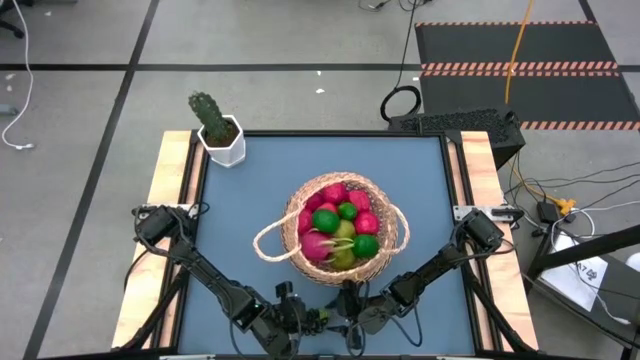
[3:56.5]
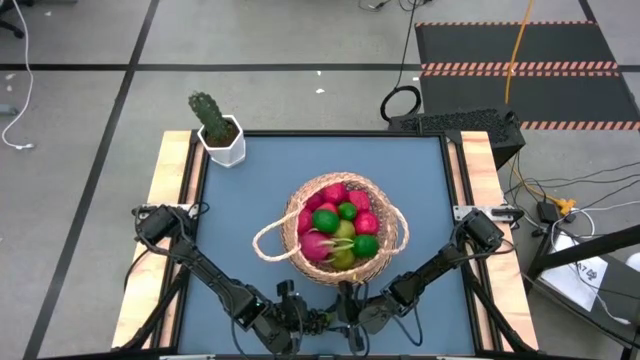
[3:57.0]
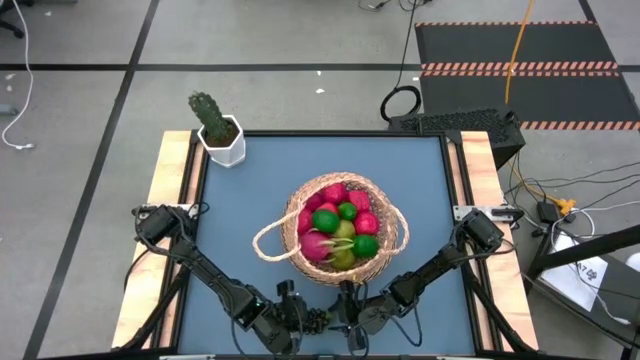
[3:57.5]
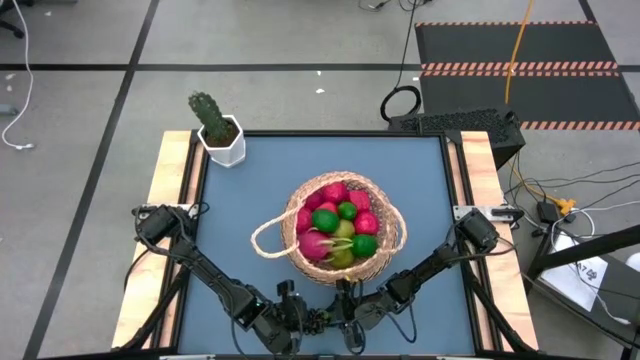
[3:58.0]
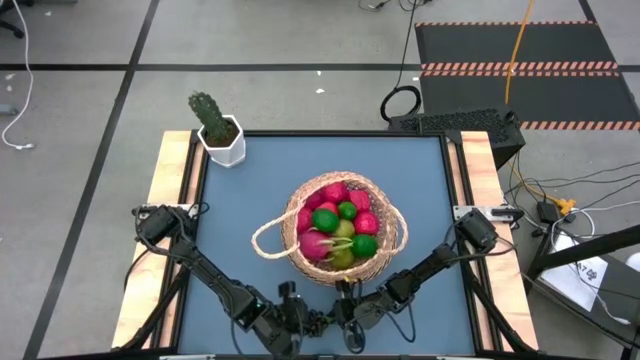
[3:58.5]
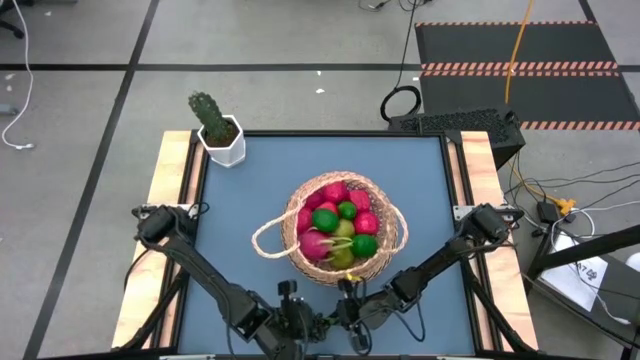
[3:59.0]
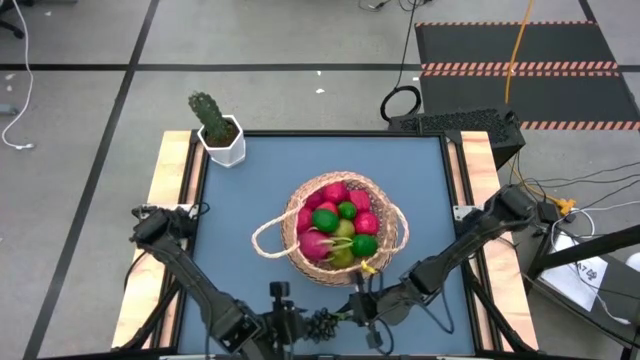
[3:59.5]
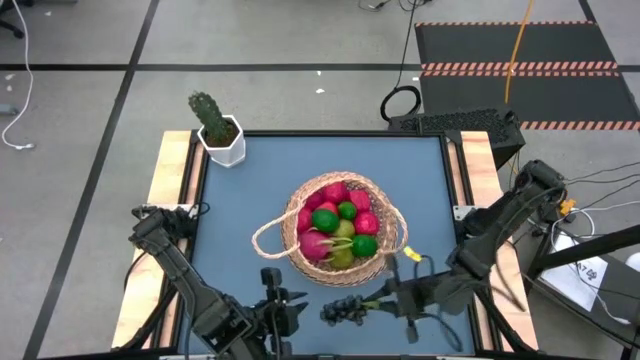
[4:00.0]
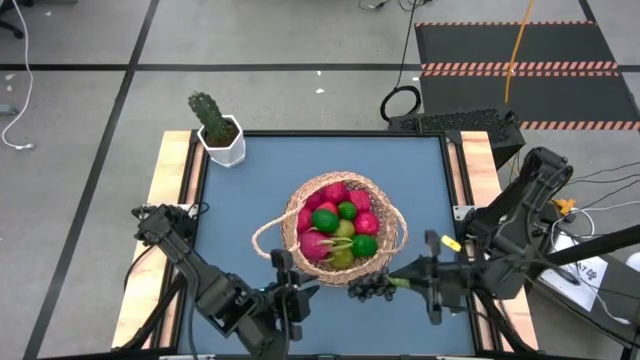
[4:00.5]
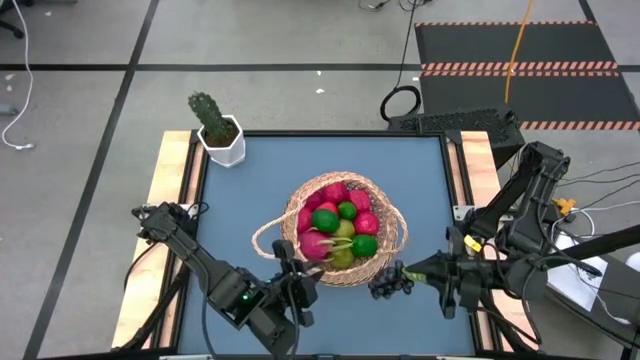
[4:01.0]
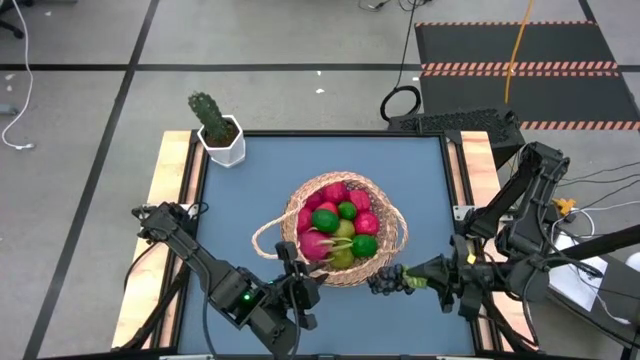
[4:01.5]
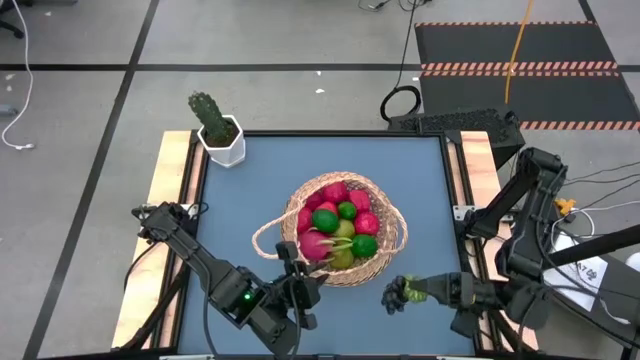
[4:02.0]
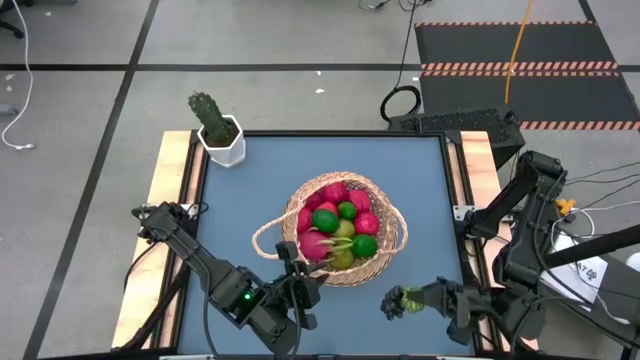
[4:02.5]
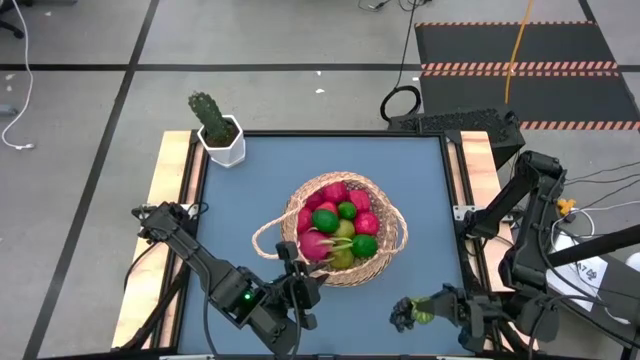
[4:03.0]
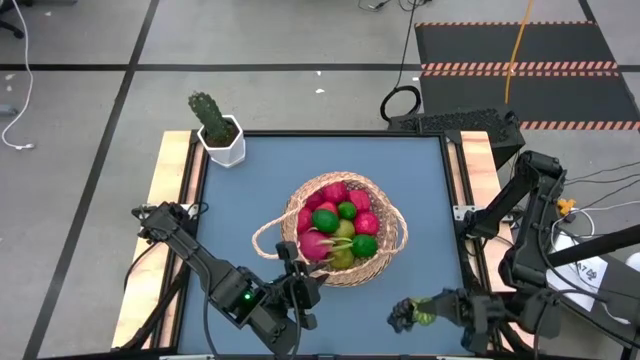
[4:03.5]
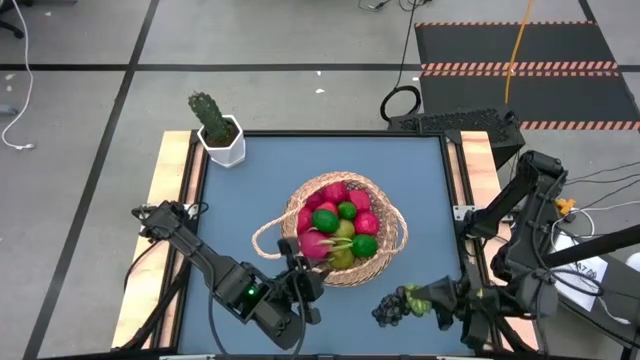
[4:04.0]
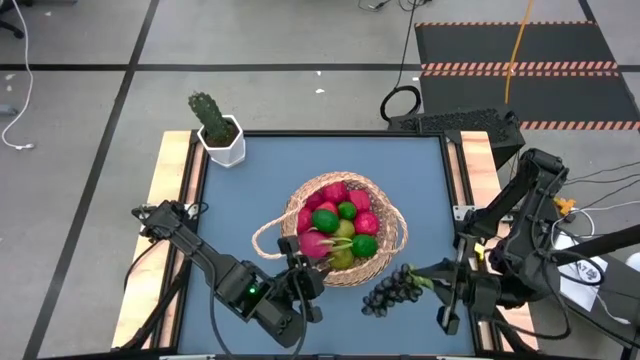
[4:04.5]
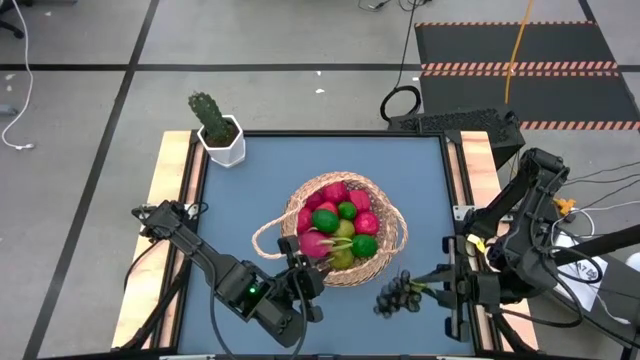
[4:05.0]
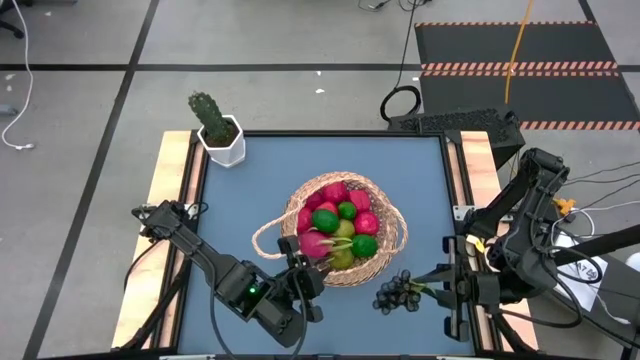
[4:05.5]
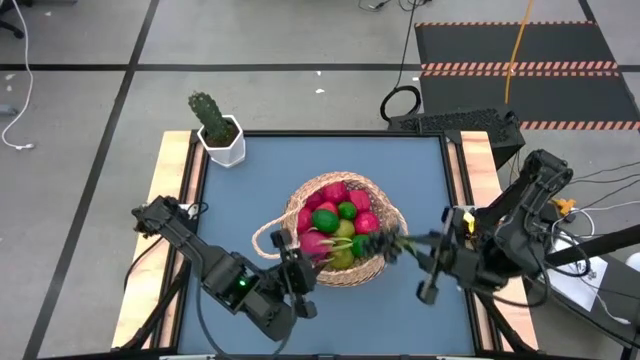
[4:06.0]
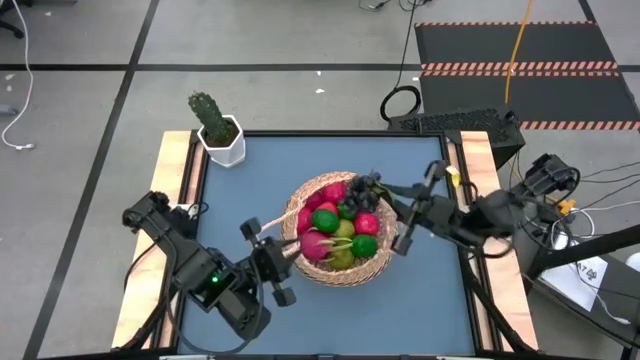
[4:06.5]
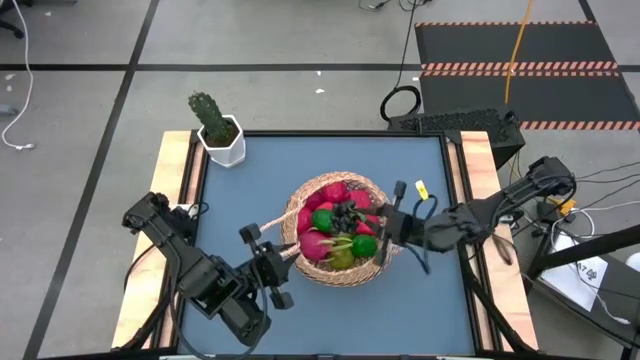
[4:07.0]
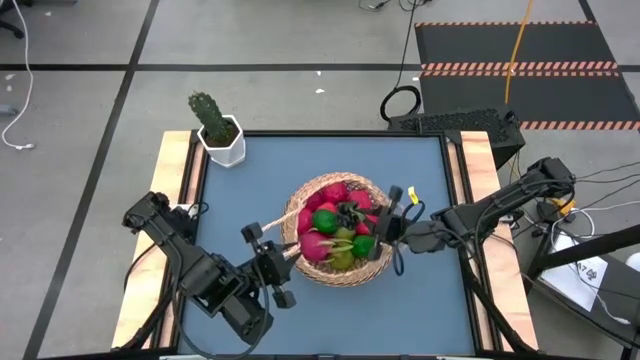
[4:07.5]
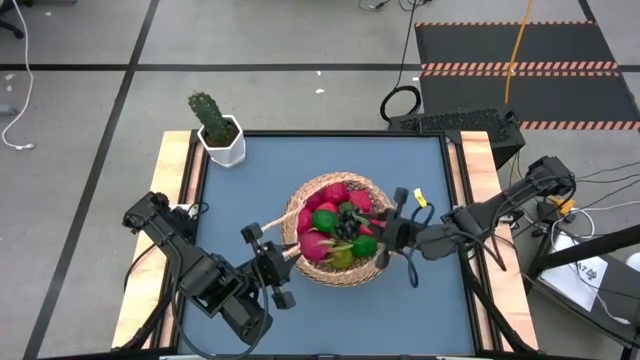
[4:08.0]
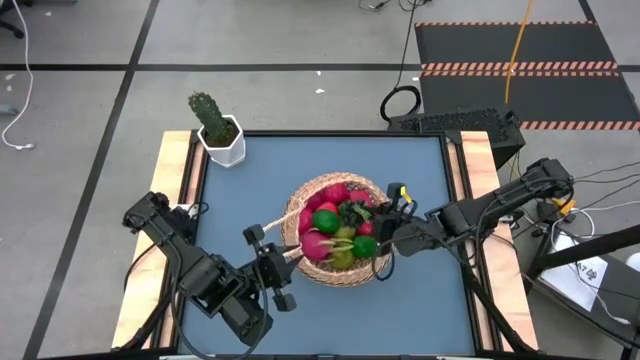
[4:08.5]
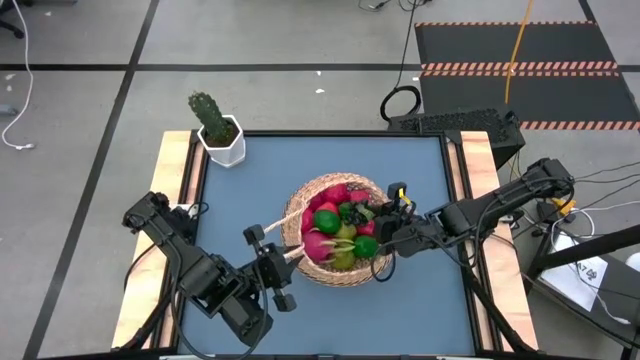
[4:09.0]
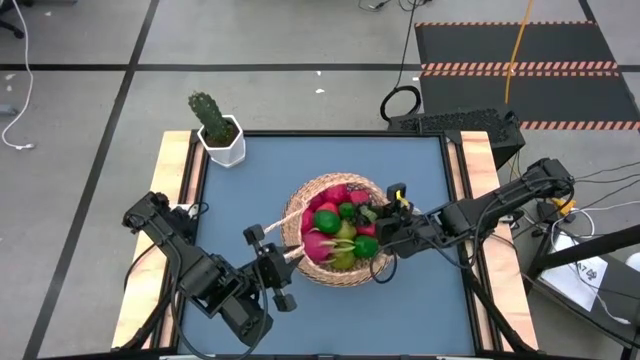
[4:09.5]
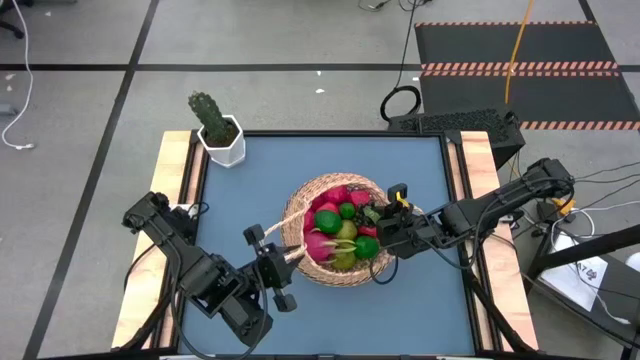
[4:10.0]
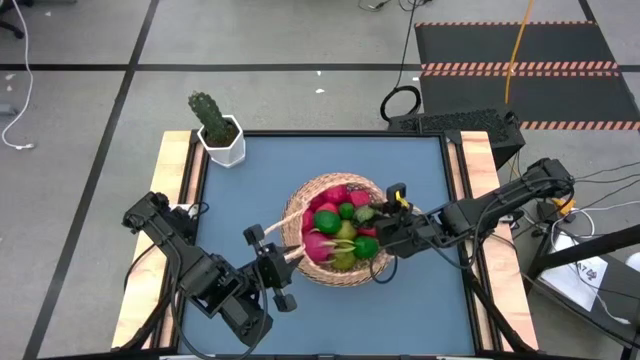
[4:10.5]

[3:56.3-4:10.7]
Task: Build produce basket
Put the black grapes into the brown basket

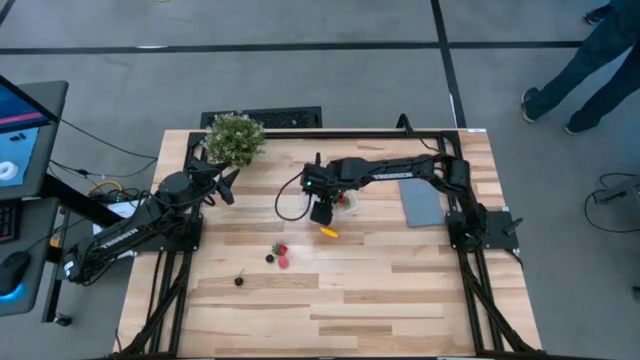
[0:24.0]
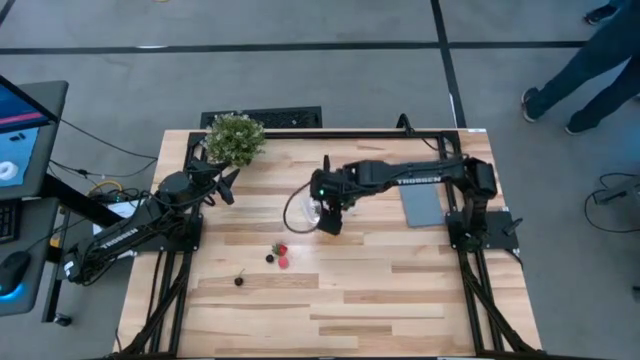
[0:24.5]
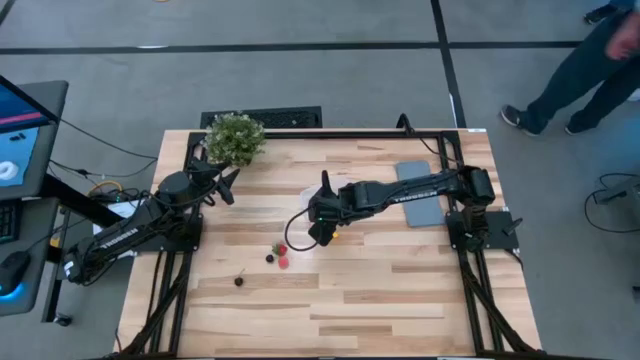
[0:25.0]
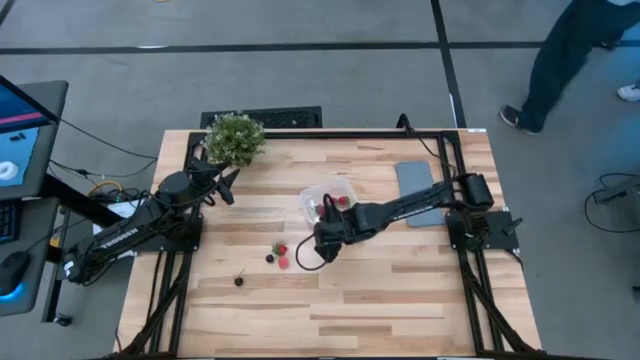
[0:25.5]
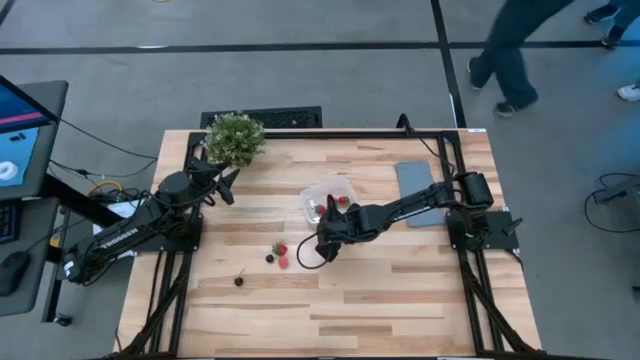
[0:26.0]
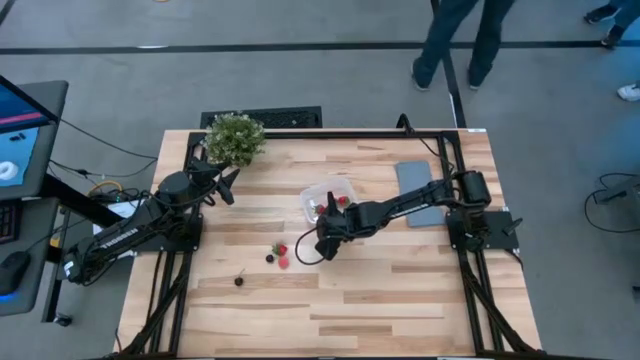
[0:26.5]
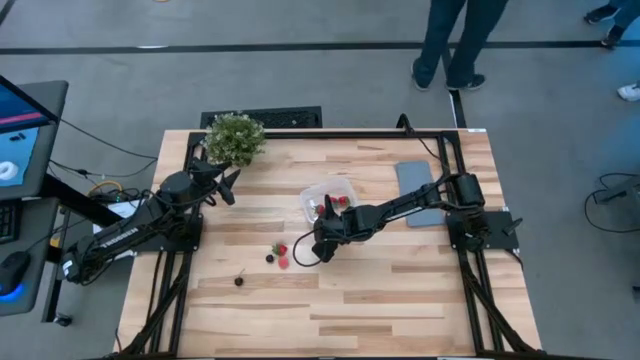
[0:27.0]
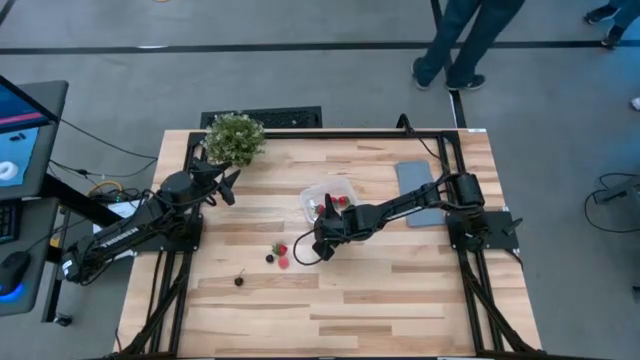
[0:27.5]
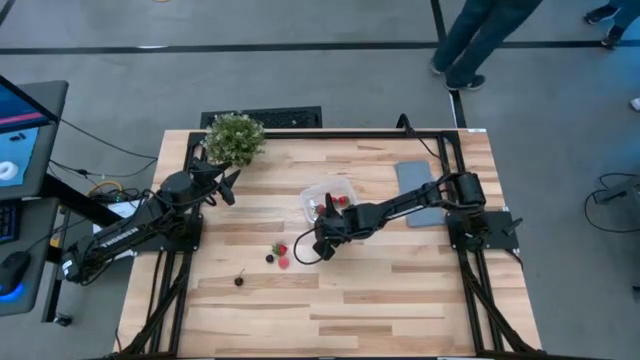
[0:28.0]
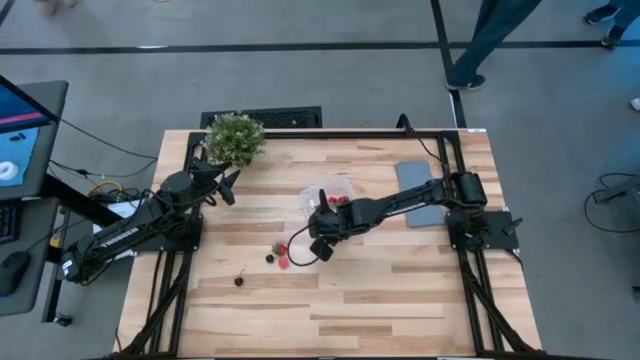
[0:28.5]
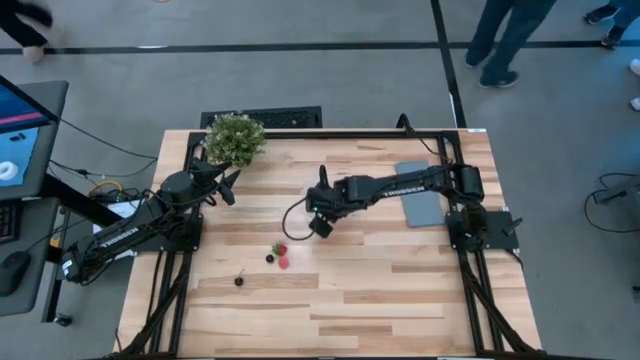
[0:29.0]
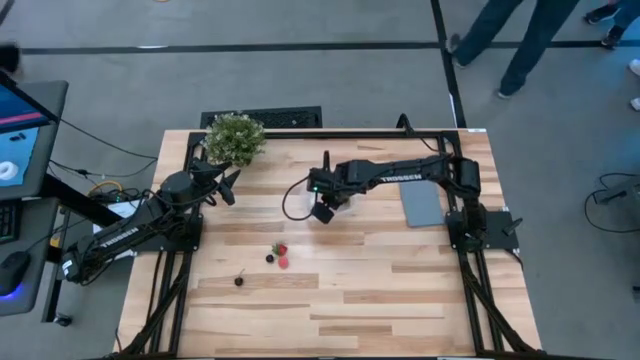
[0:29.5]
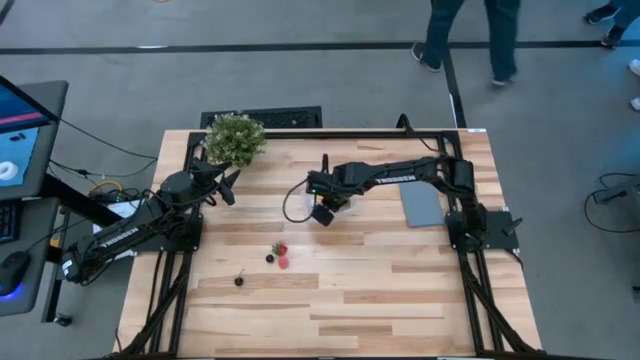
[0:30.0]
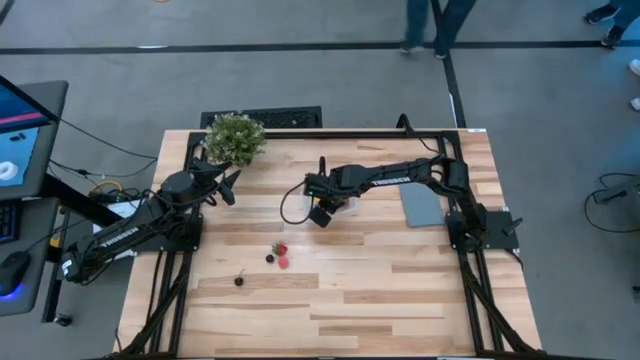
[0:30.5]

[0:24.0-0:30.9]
Task: Pick and placing Produce into tupperware
Put the corn into the transparent bin
